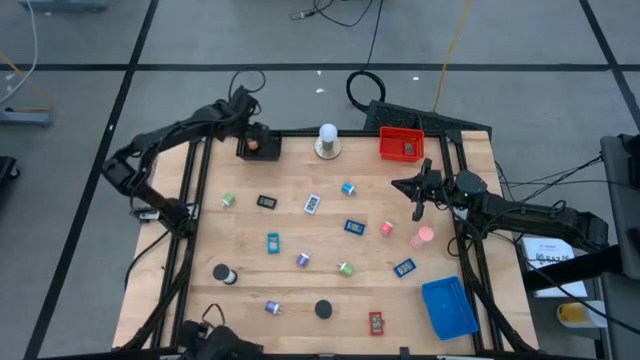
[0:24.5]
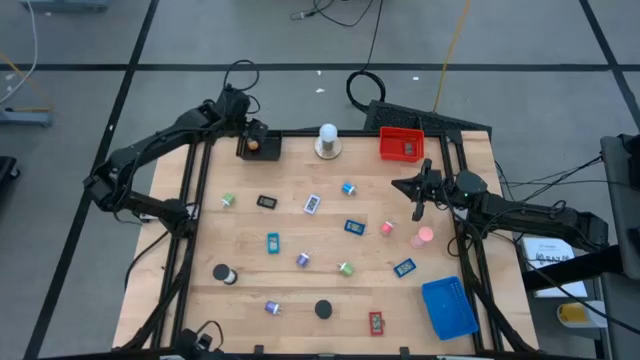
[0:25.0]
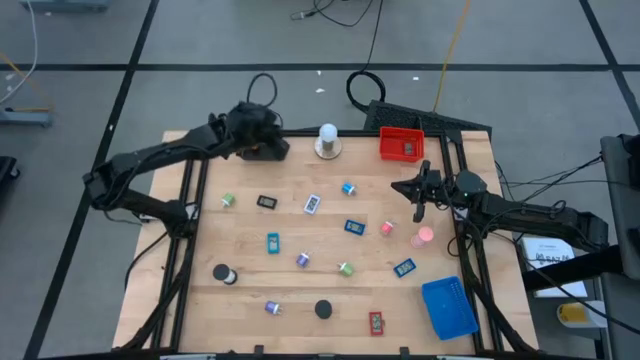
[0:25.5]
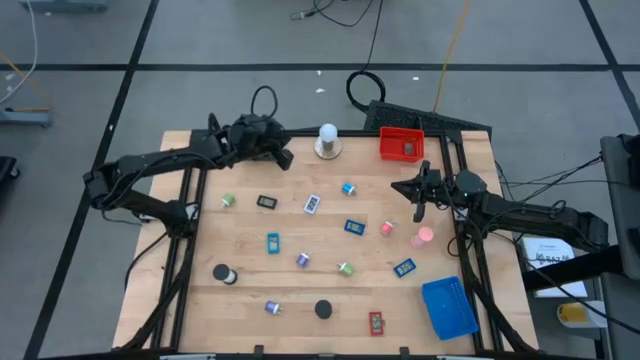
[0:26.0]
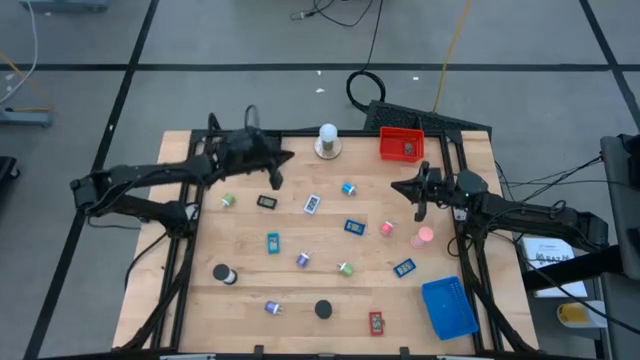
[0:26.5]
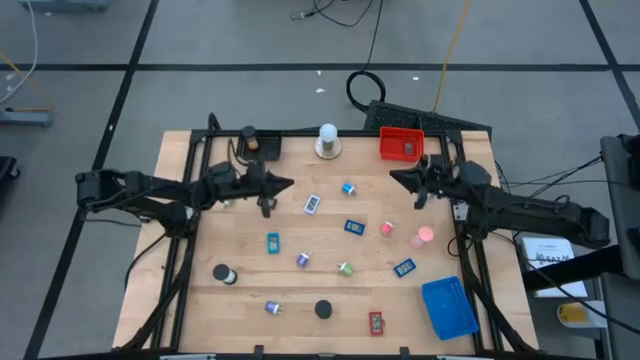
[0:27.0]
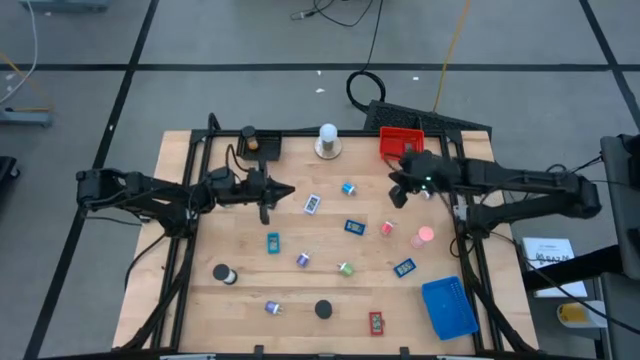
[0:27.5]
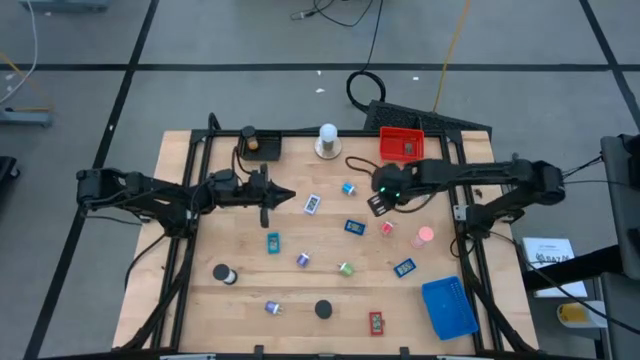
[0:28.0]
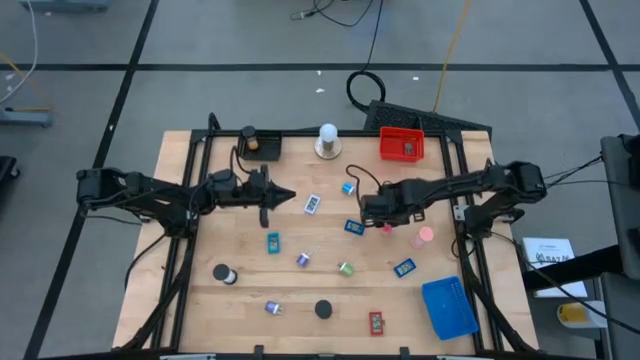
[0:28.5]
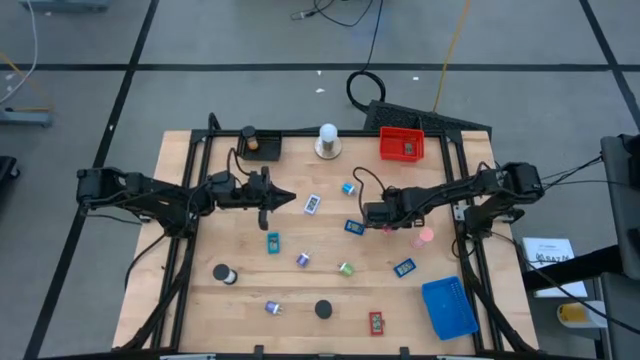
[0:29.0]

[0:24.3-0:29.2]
Task: Pick & Place Office items
Put the pink charger adapter into the blue bin

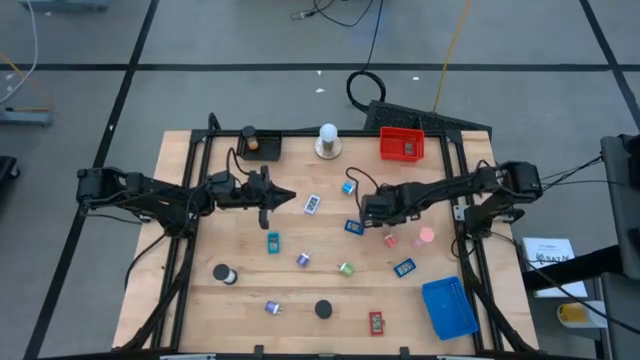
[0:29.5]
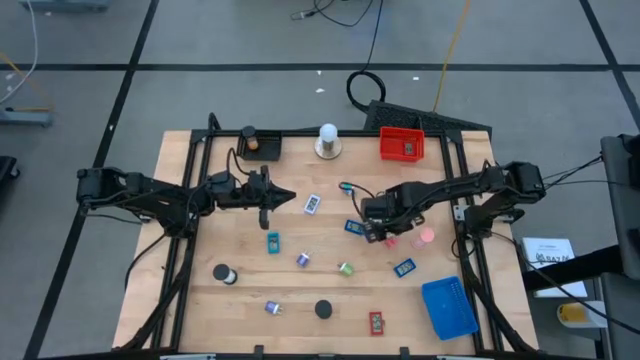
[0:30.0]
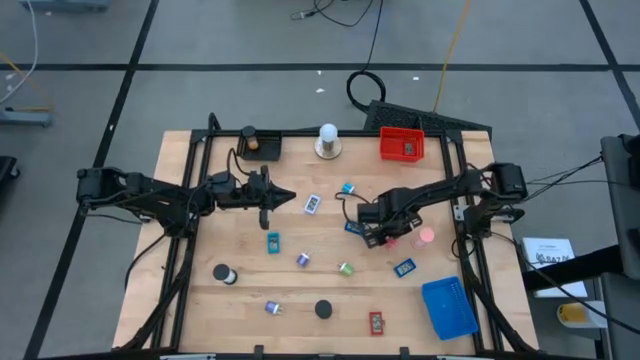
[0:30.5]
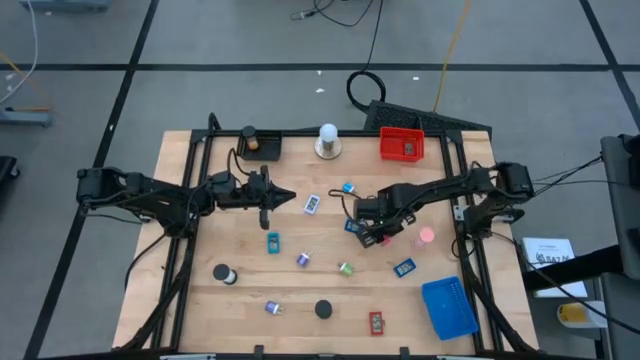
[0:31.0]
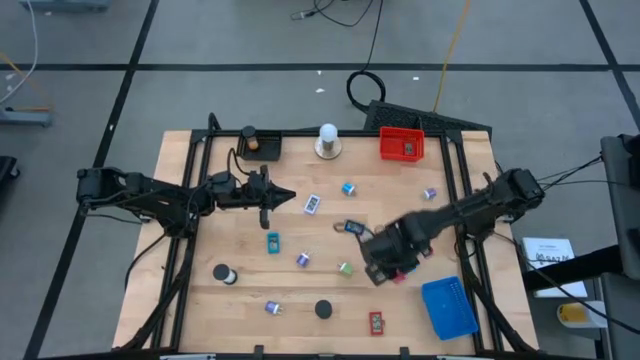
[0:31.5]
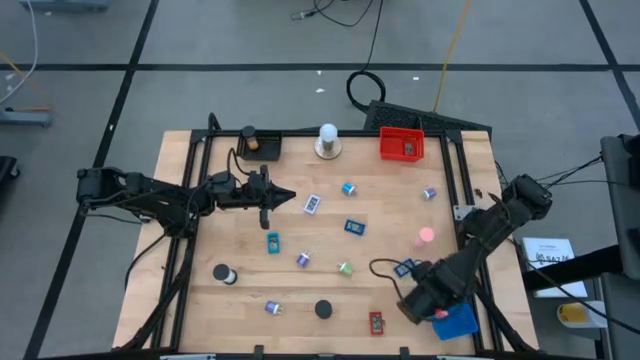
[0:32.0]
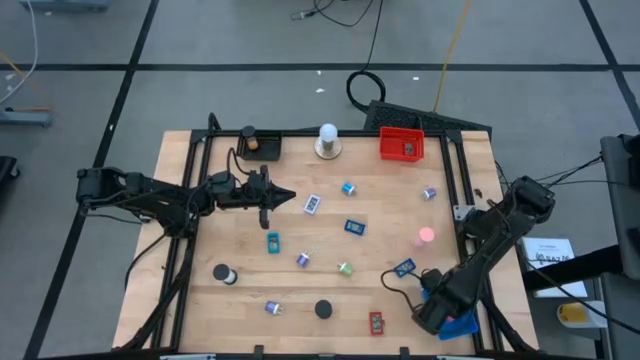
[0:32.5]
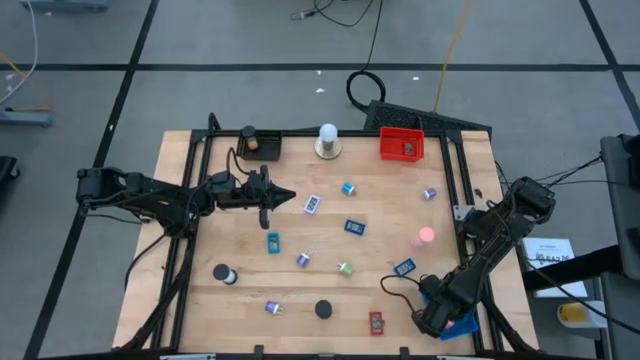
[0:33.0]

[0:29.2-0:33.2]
Put the pink charger adapter into the blue bin

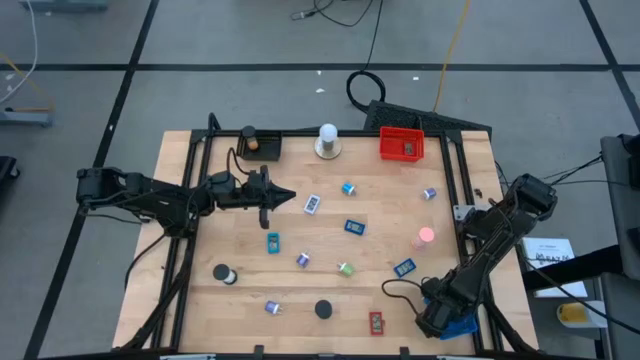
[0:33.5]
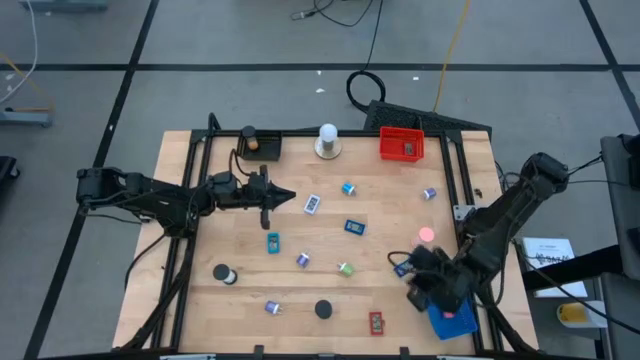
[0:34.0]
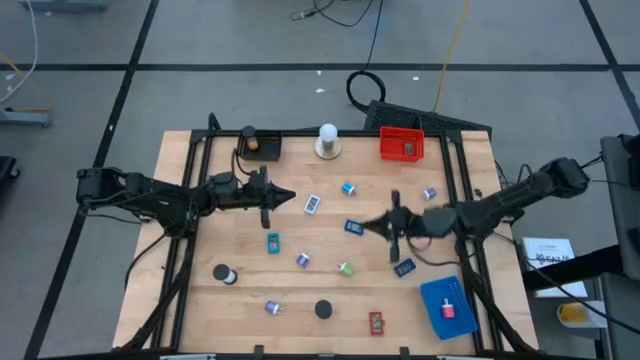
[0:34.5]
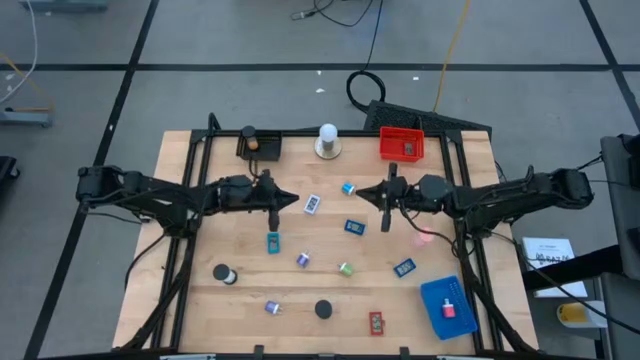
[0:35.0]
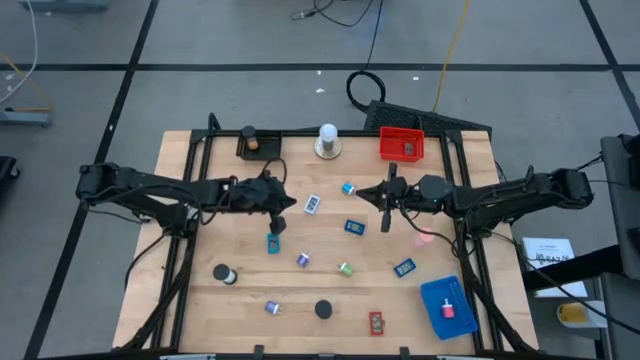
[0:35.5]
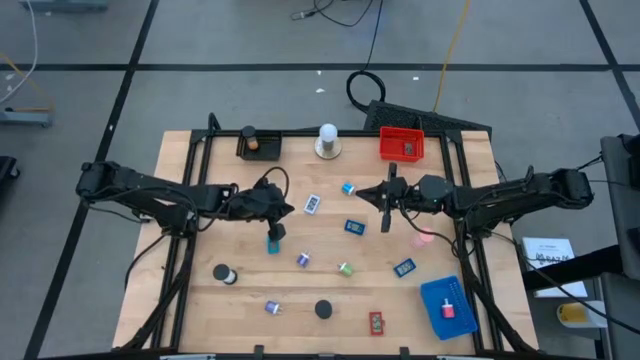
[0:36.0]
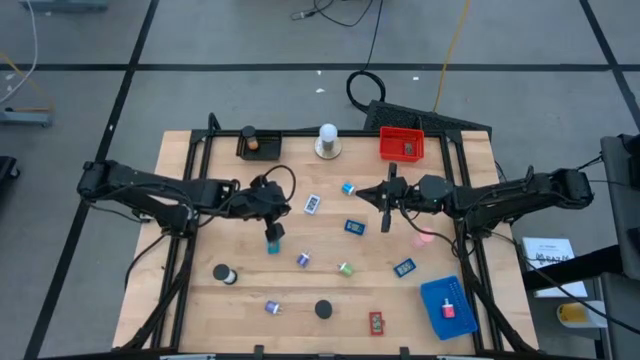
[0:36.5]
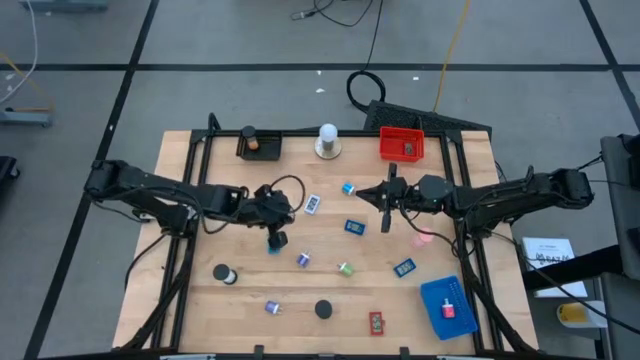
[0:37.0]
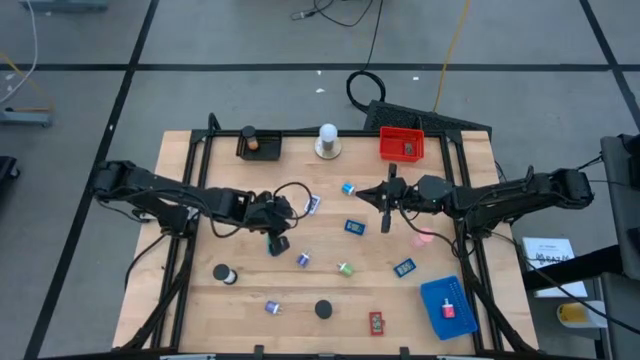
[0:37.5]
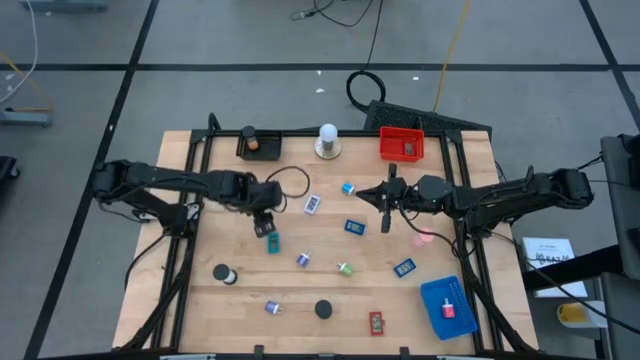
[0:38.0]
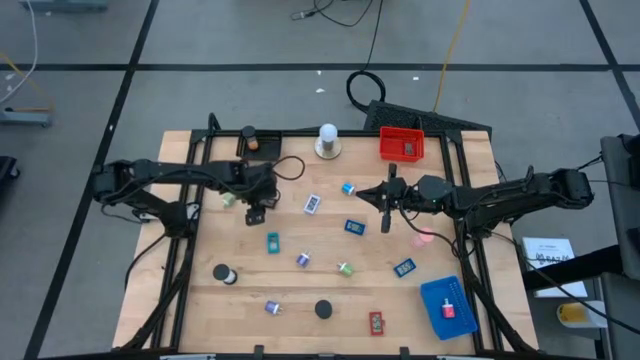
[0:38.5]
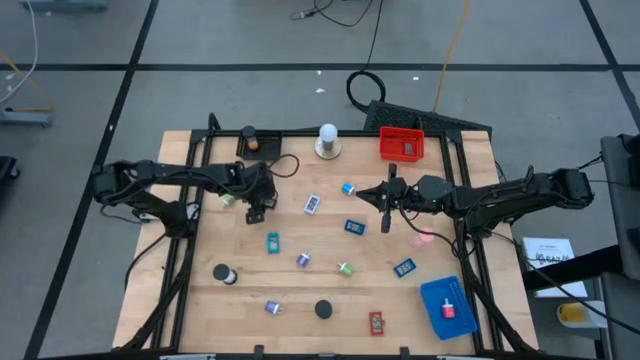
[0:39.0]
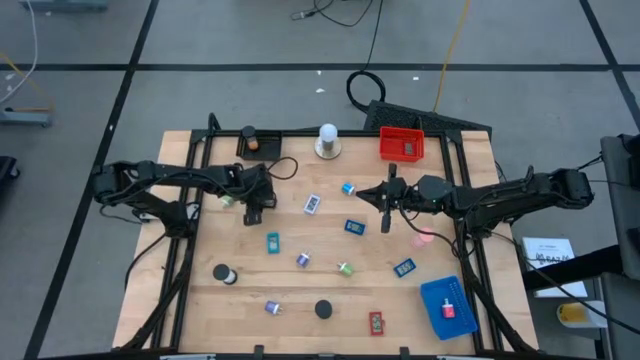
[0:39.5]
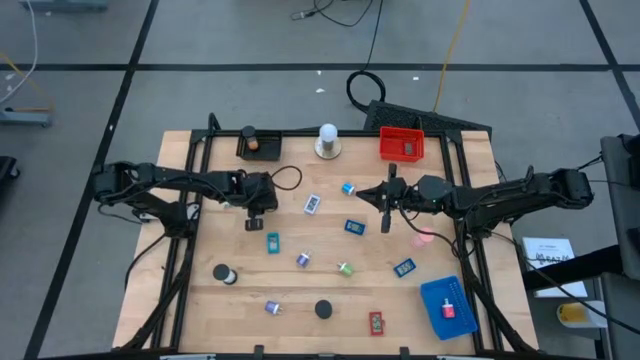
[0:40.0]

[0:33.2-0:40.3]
Put the black digital timer into the red bin

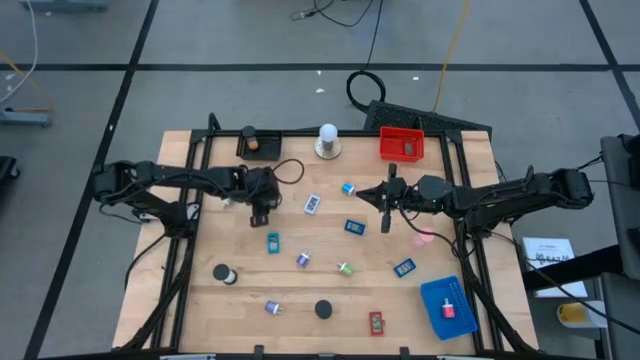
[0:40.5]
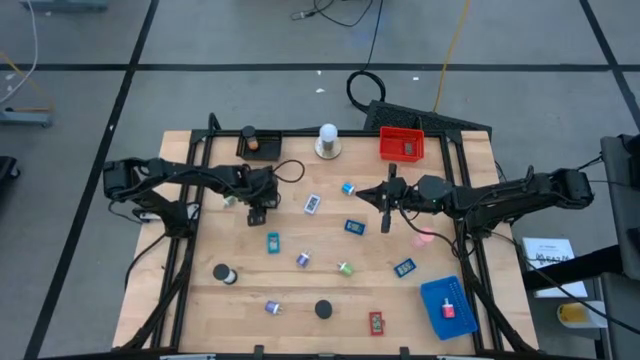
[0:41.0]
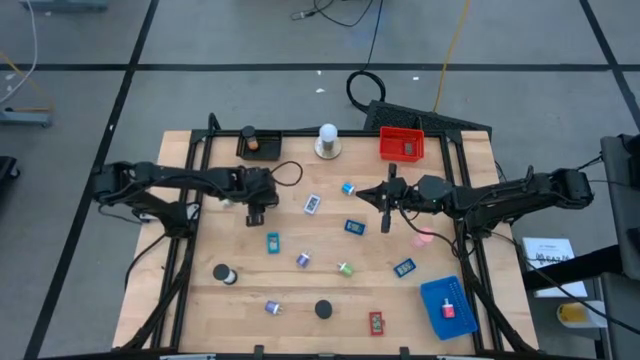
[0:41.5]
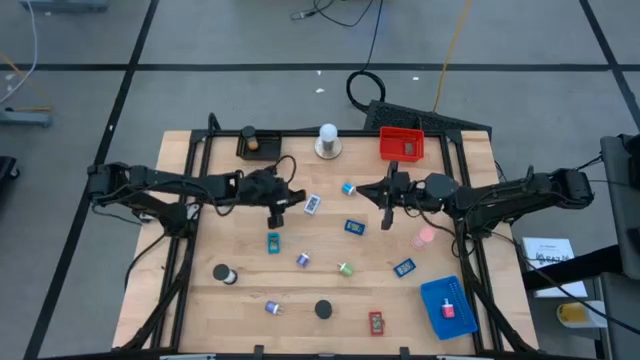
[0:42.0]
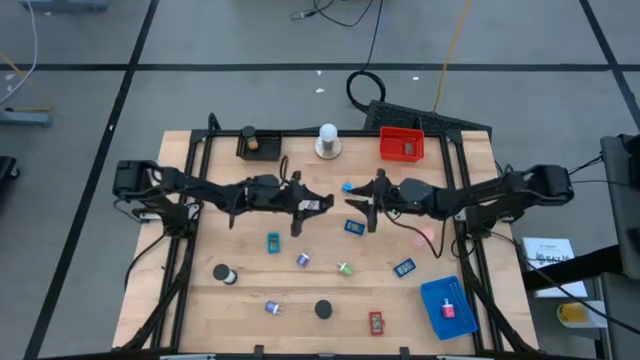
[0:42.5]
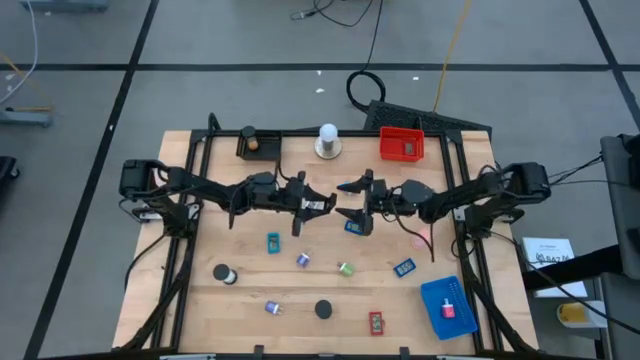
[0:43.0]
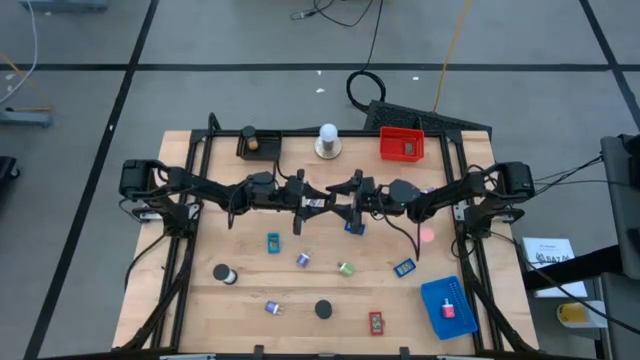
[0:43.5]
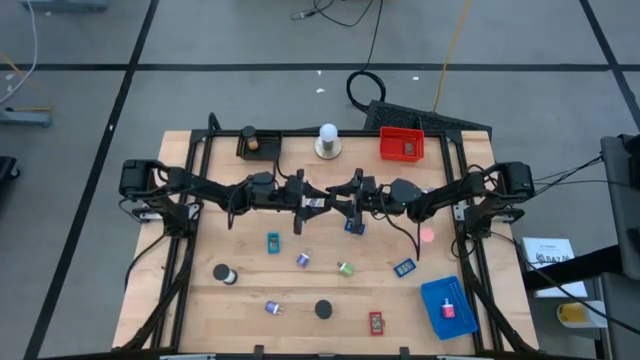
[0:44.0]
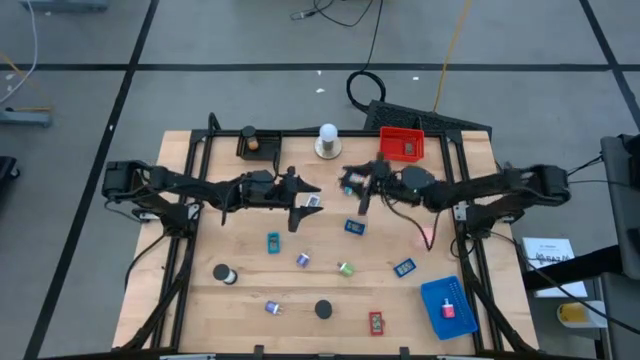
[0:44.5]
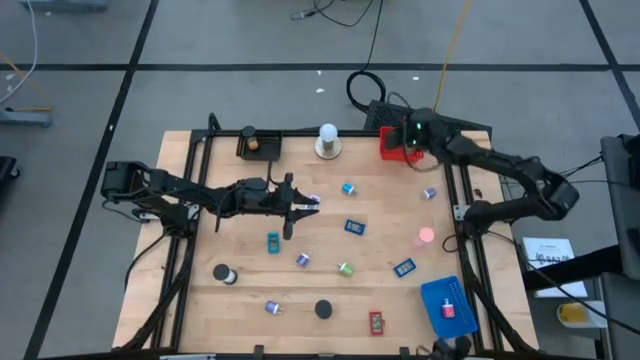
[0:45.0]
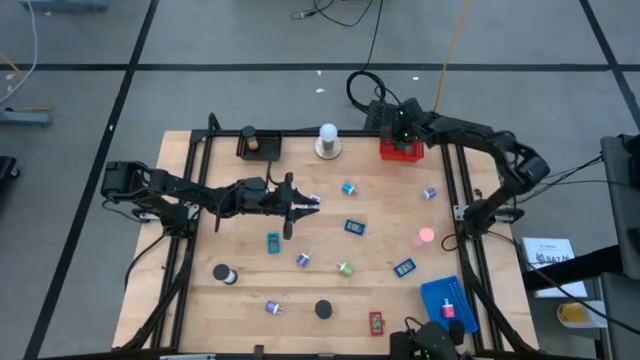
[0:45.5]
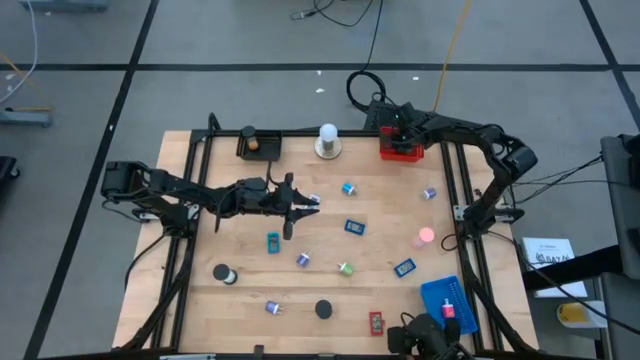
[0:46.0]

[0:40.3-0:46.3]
Put the black digital timer into the red bin
